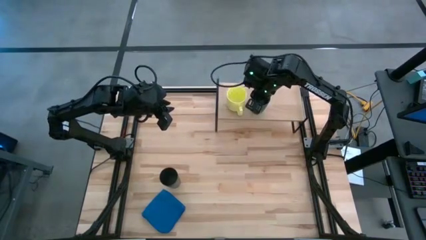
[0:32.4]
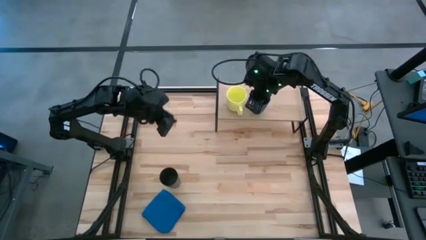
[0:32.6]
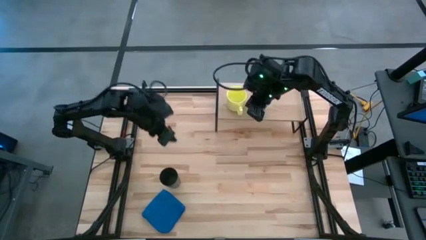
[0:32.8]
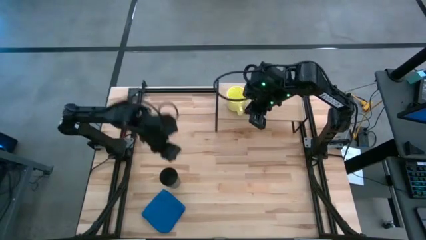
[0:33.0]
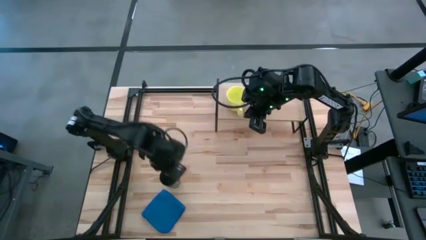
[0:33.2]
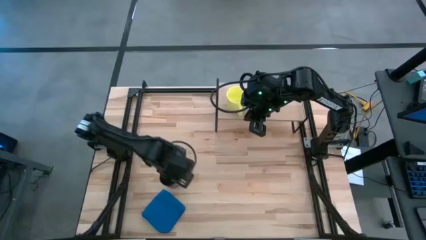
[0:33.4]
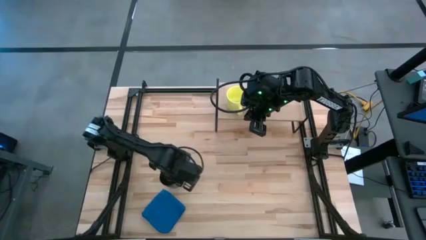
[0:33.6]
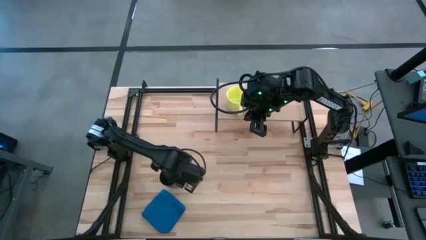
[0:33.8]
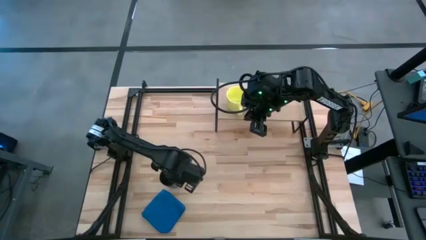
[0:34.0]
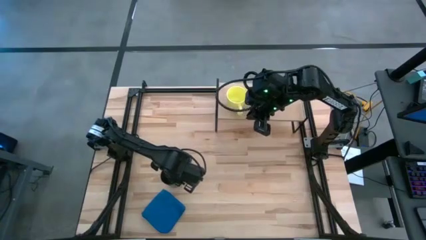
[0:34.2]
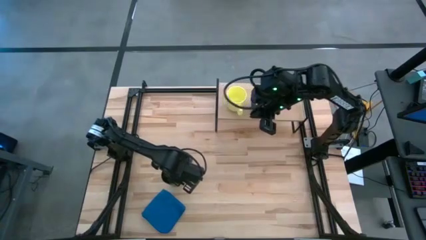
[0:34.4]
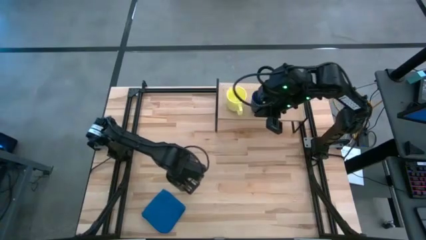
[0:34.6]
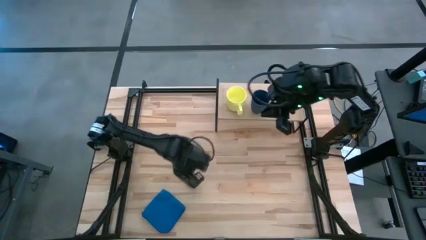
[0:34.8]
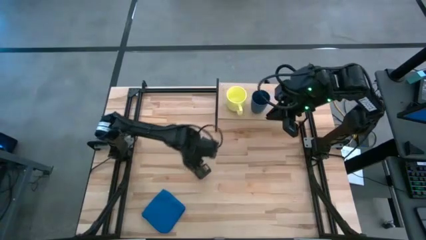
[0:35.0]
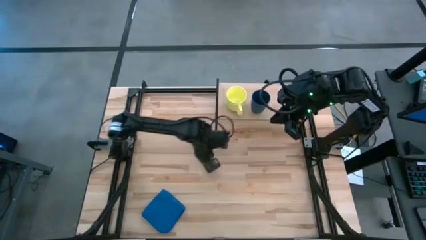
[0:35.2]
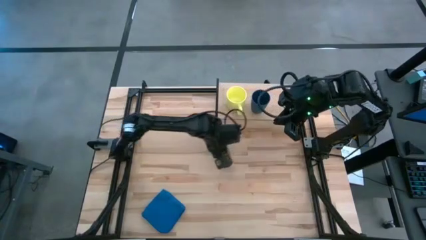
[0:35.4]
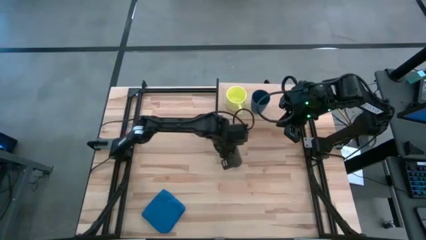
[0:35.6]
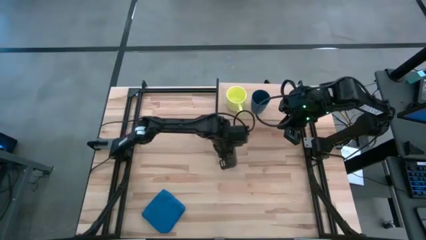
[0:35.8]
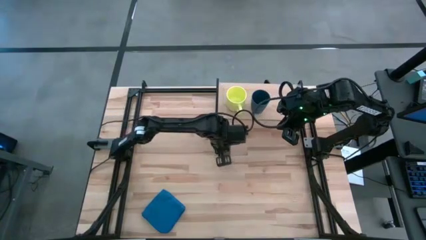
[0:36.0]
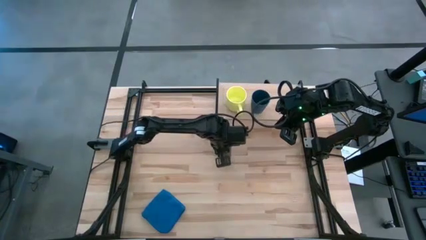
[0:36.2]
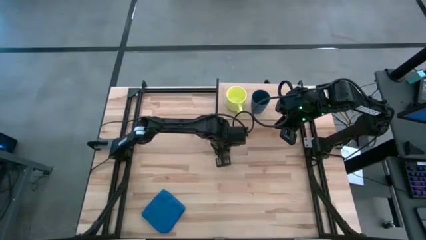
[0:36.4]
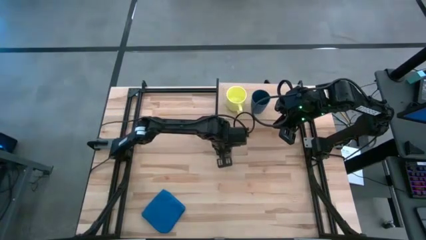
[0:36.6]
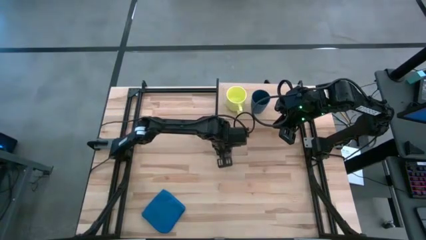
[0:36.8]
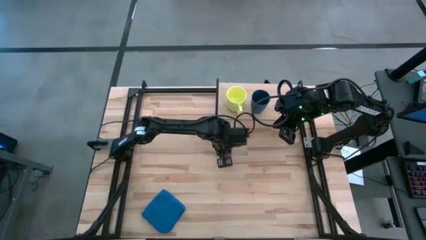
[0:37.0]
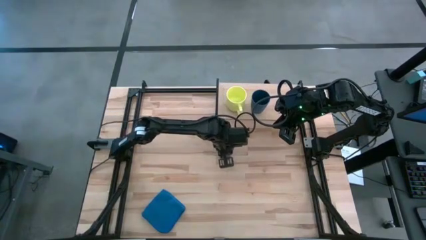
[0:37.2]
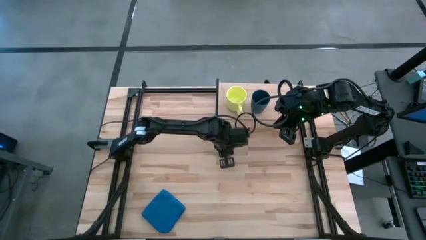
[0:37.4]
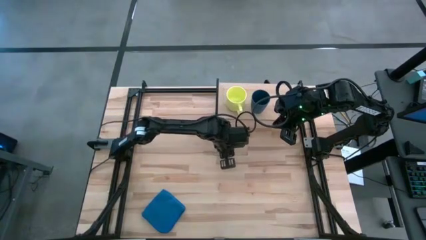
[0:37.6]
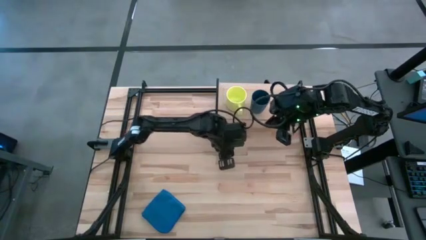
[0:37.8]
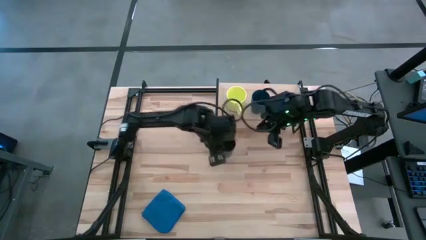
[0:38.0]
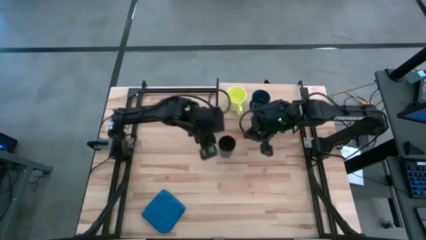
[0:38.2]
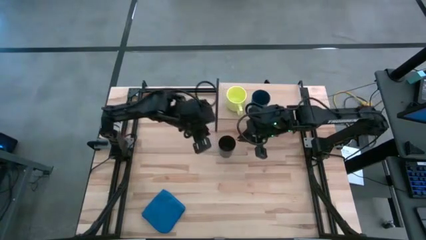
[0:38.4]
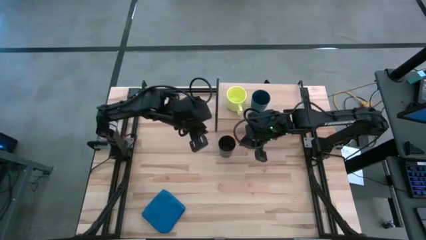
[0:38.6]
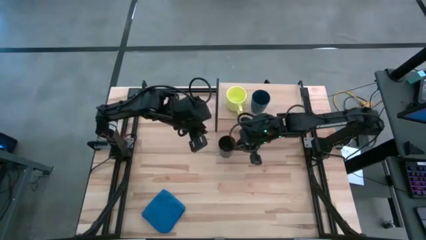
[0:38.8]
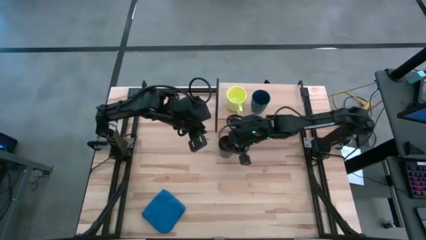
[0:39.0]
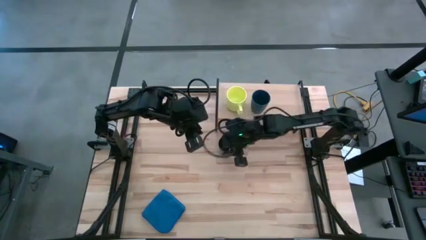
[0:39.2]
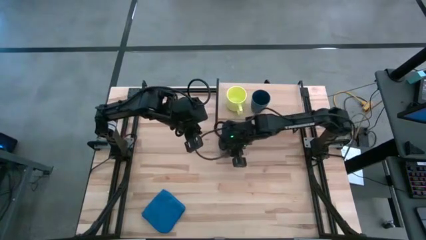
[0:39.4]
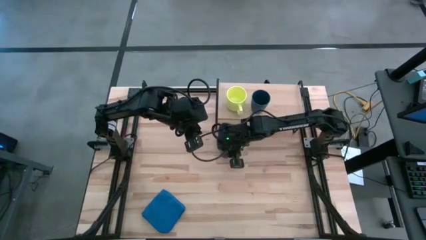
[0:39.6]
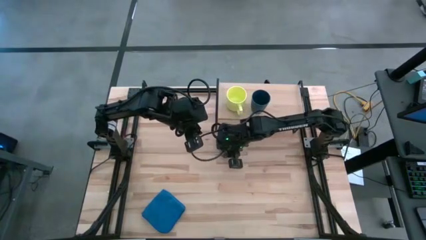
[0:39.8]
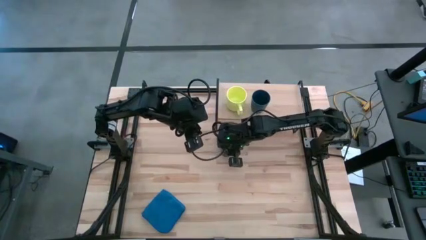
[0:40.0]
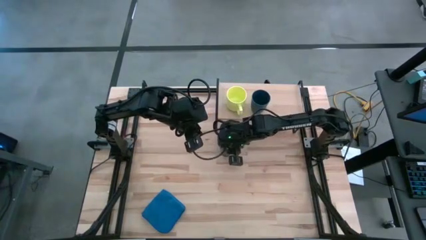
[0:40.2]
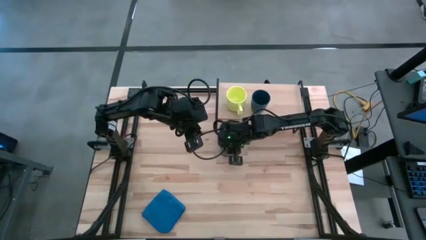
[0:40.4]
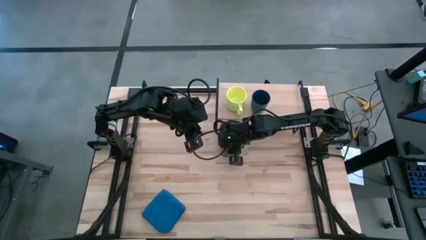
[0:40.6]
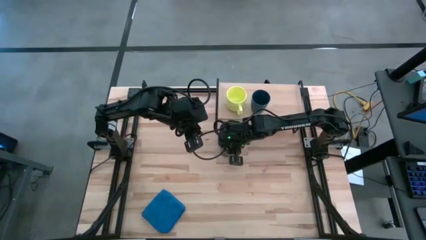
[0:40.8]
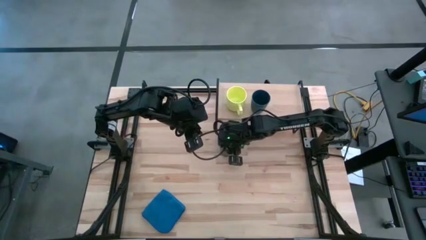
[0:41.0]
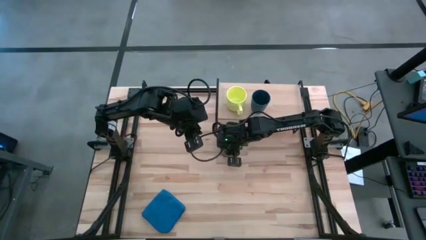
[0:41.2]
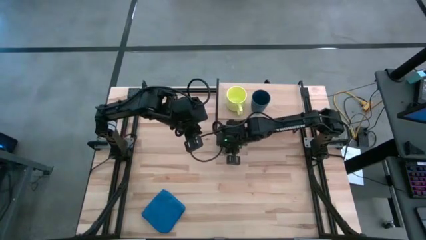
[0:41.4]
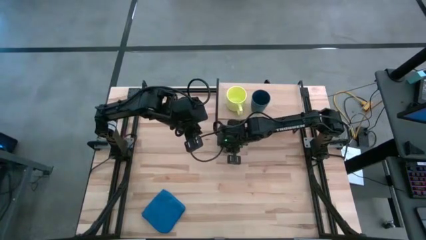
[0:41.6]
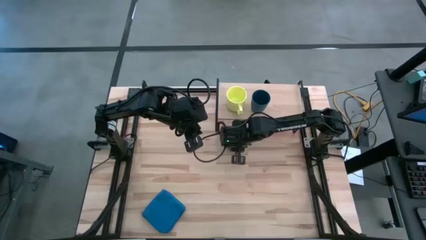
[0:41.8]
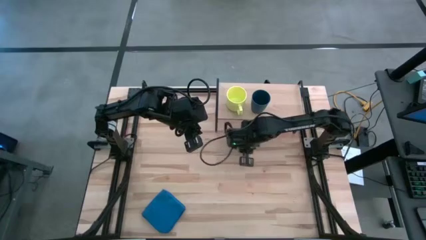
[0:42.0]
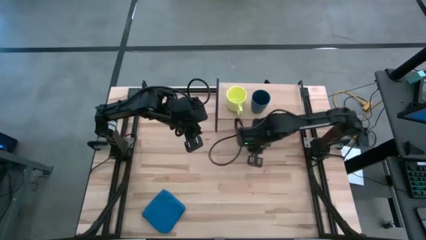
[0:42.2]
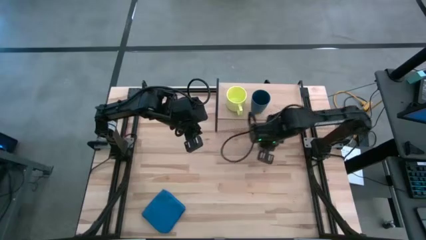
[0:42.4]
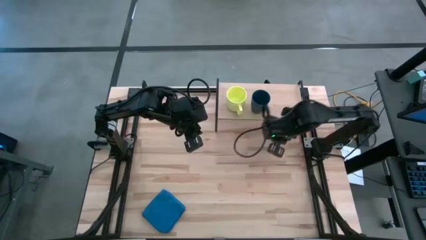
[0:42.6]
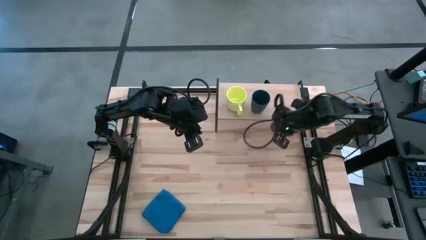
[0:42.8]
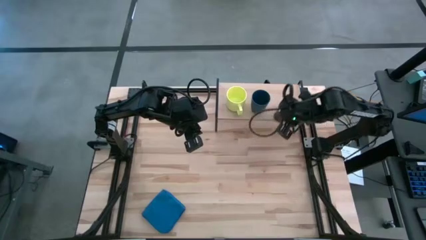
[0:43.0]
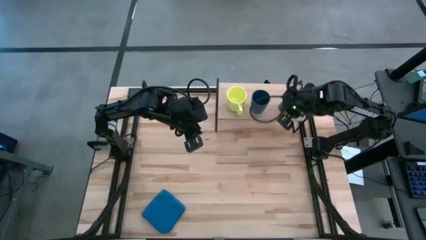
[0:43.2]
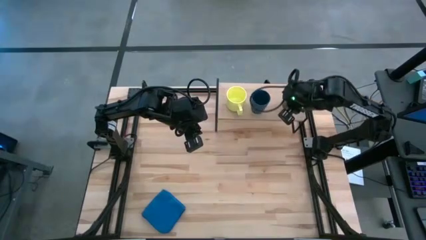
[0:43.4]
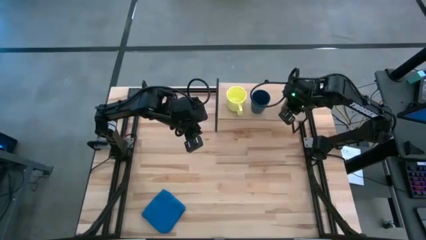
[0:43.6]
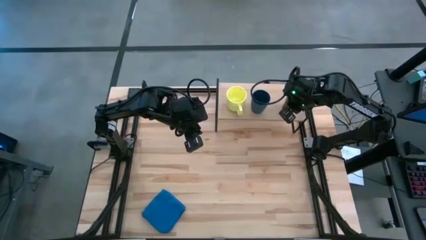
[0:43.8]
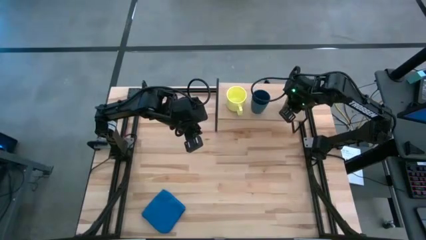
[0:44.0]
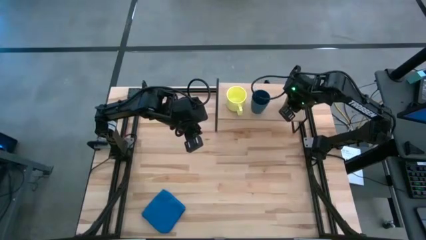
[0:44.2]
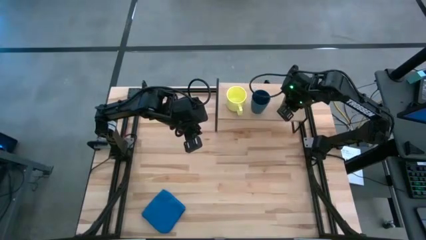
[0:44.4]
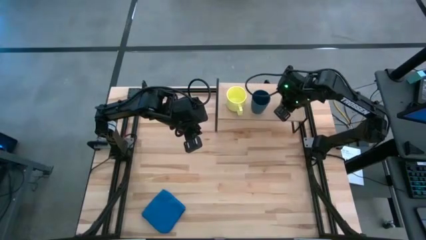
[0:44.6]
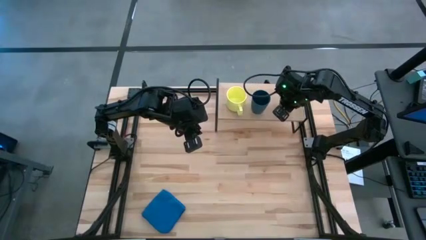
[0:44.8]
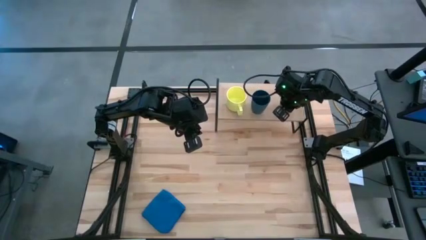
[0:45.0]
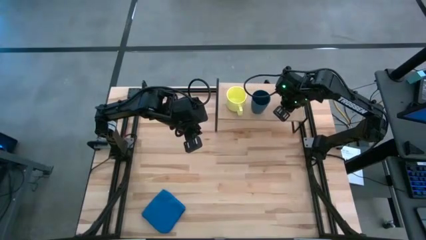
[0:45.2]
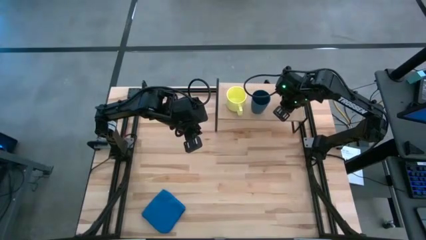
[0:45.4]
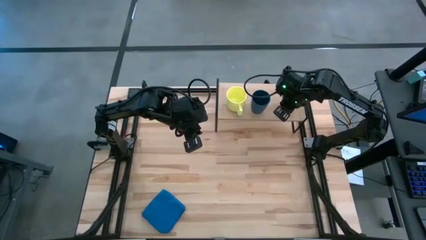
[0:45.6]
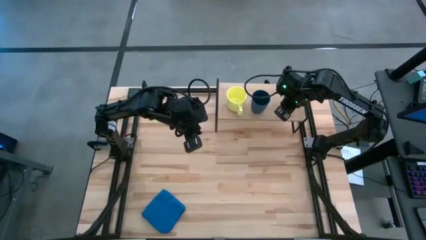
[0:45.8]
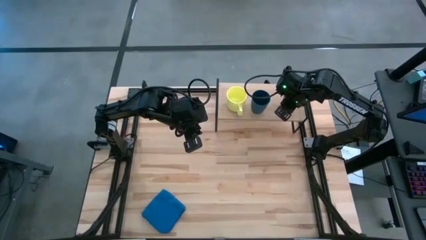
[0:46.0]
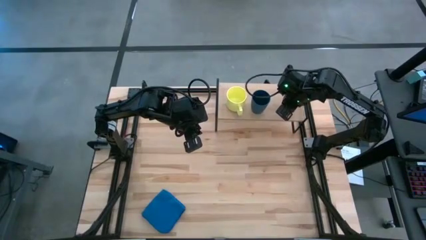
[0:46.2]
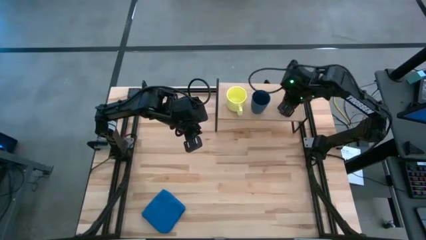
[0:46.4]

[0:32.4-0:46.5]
Task: Stack small to large cups/mugs on shelf
Put the black cup on the shelf

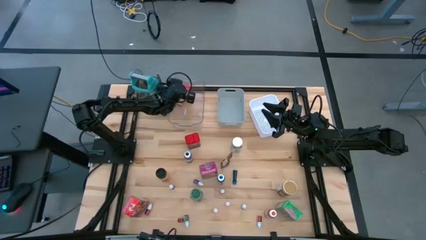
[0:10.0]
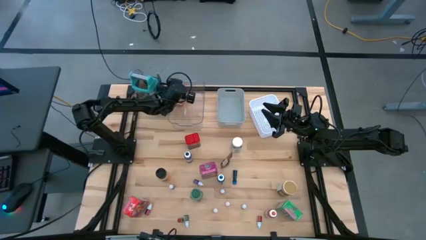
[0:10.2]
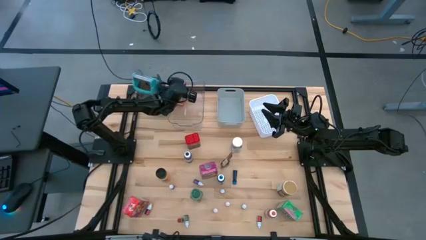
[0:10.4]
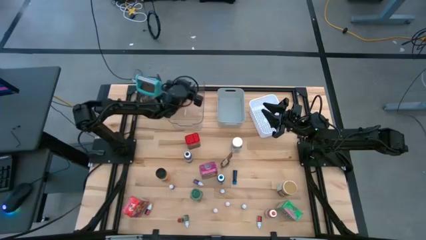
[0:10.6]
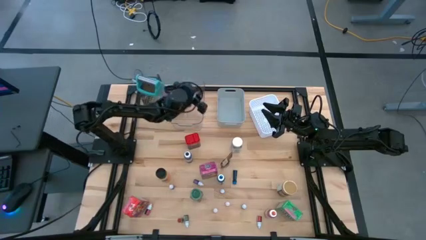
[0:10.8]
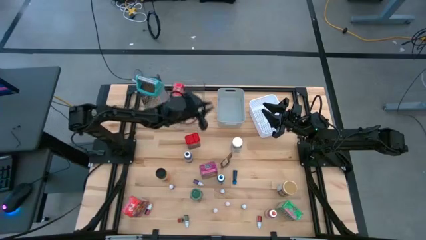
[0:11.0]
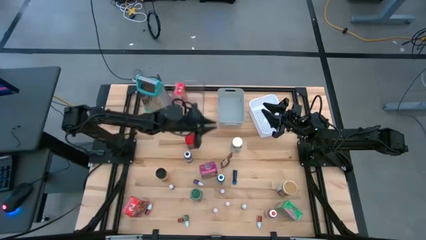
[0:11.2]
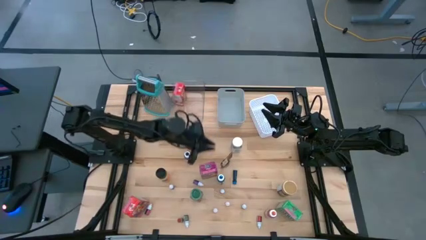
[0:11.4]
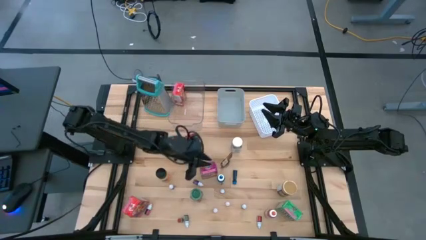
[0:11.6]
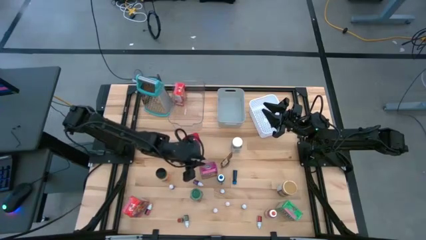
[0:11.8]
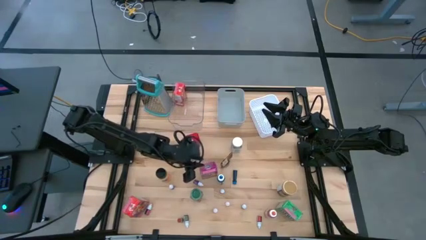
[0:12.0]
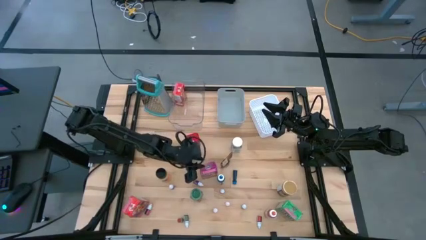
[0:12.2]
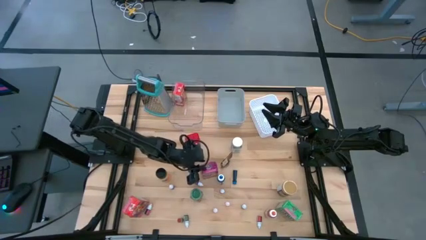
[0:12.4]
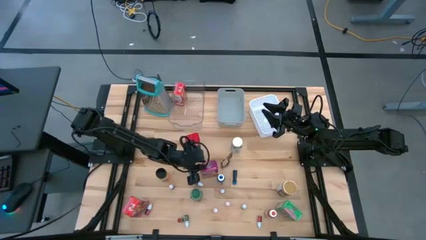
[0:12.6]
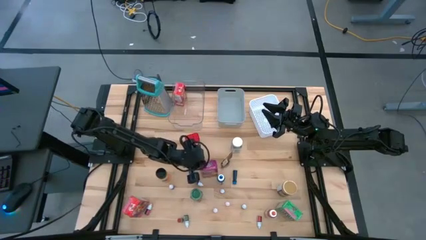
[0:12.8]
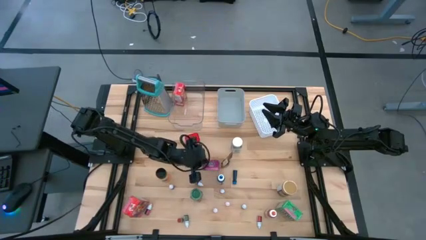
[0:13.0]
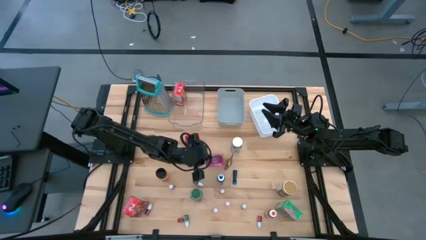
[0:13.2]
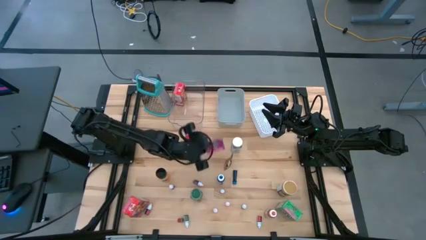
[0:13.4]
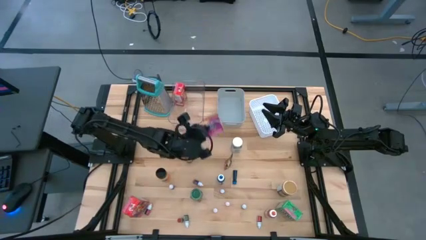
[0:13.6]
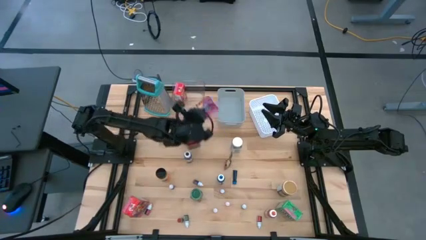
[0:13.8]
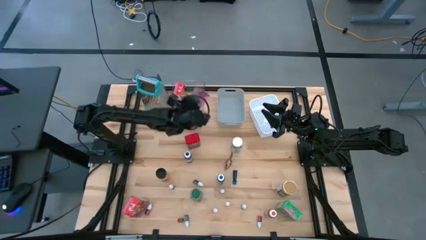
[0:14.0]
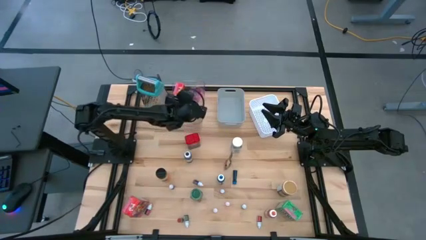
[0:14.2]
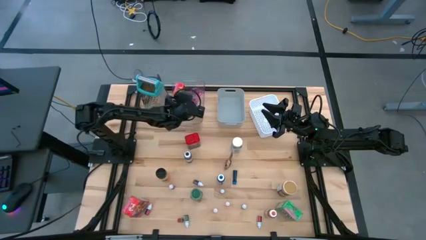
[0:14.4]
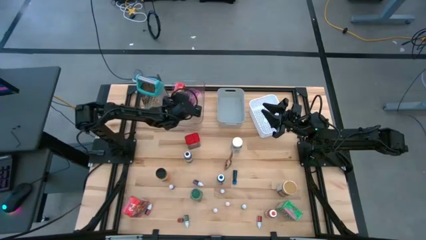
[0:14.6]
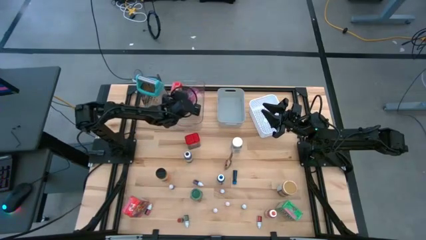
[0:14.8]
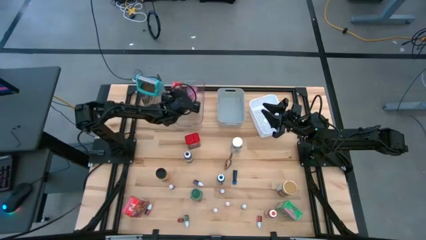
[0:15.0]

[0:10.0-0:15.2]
Task: Pick & Place Kitchen Items
Put the pink cereal box into the transparent bin
